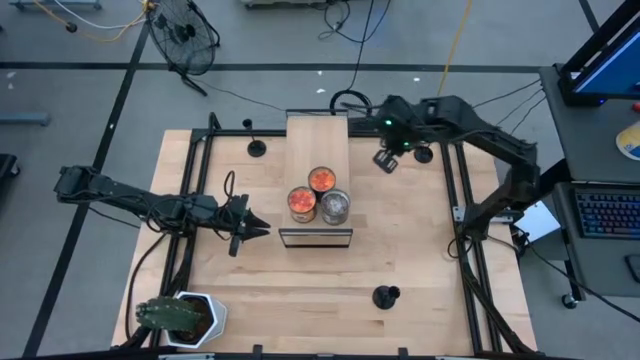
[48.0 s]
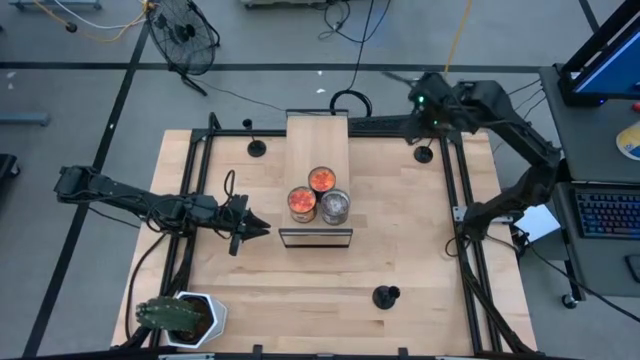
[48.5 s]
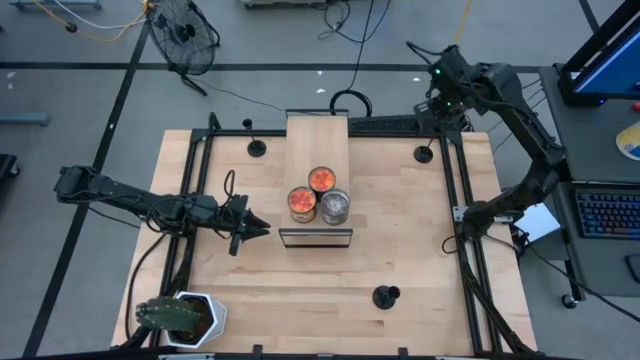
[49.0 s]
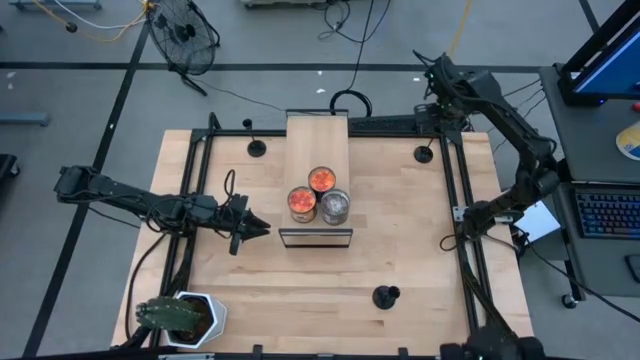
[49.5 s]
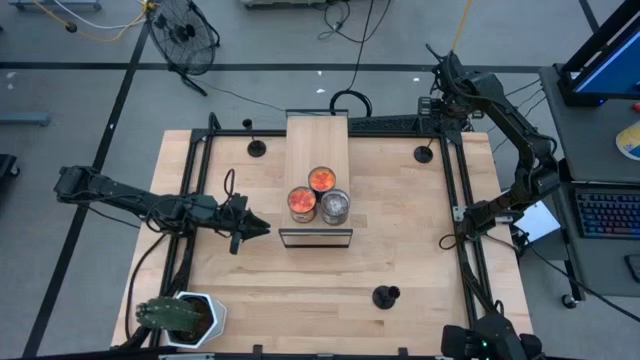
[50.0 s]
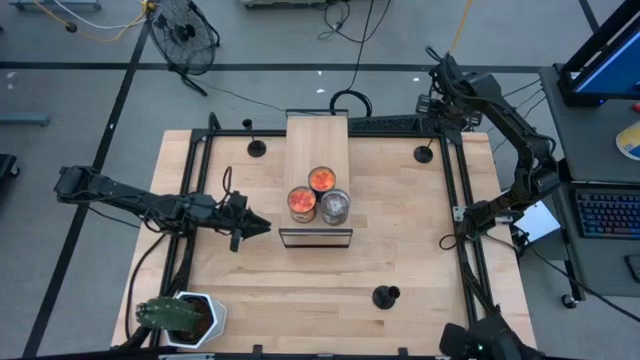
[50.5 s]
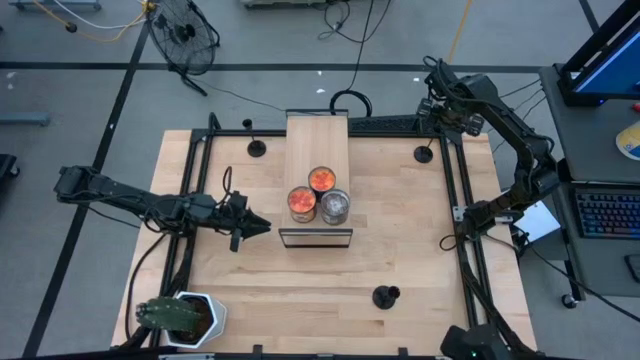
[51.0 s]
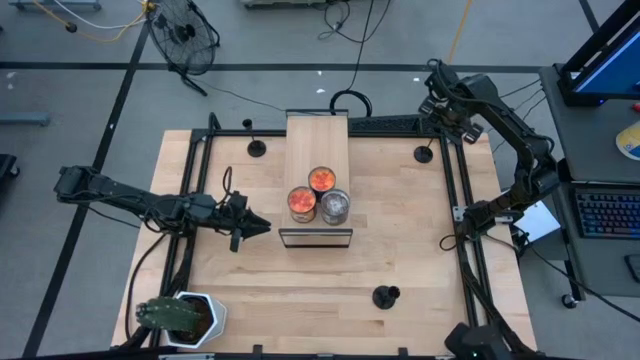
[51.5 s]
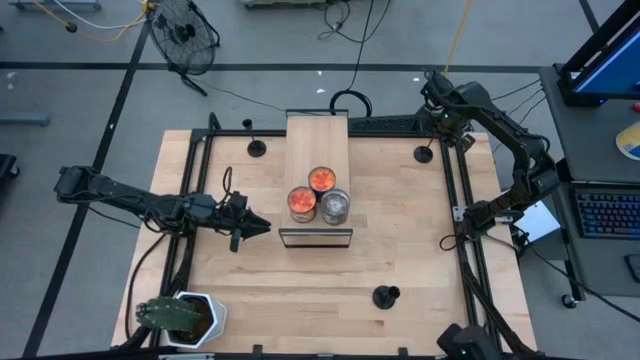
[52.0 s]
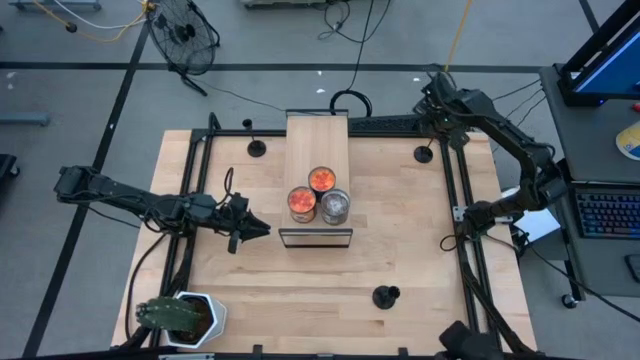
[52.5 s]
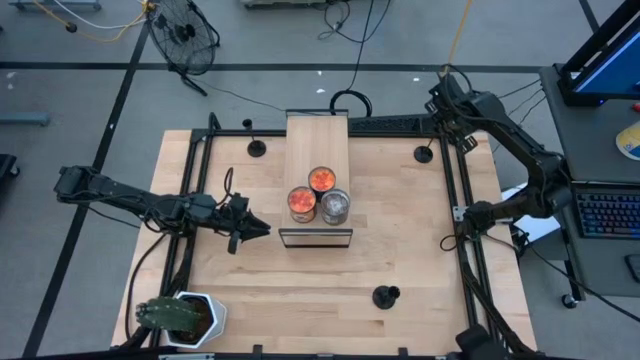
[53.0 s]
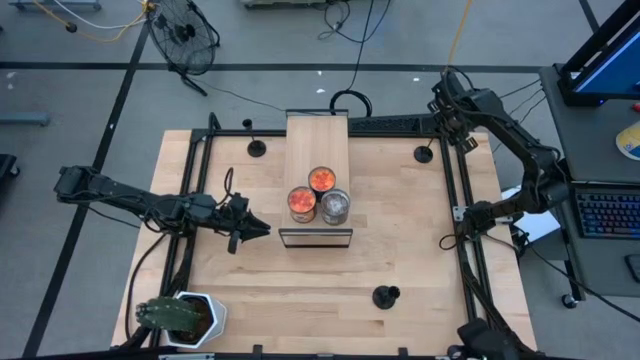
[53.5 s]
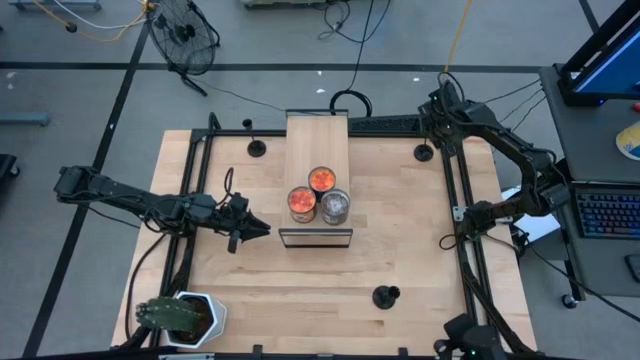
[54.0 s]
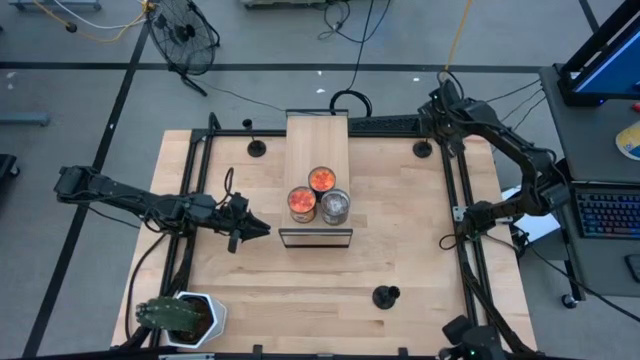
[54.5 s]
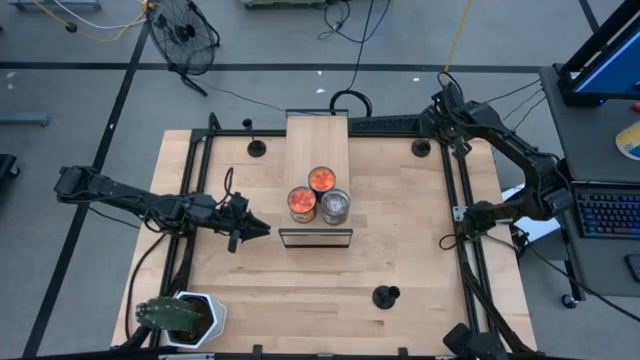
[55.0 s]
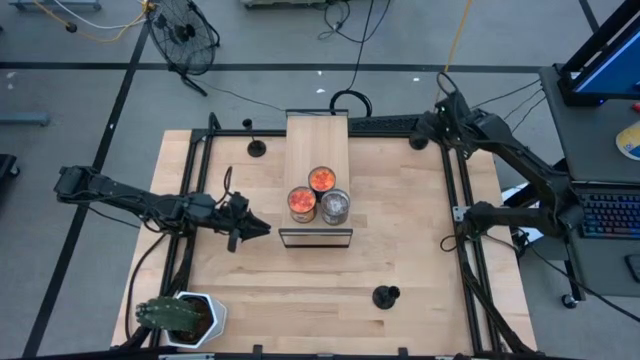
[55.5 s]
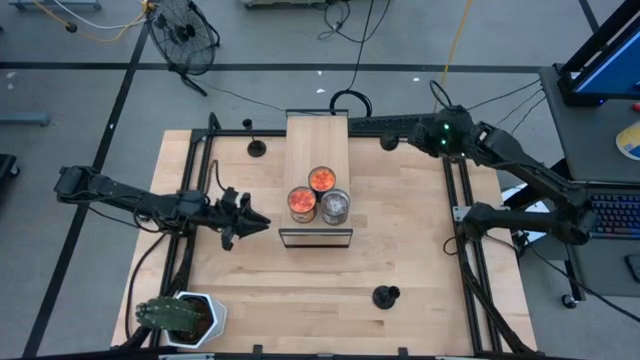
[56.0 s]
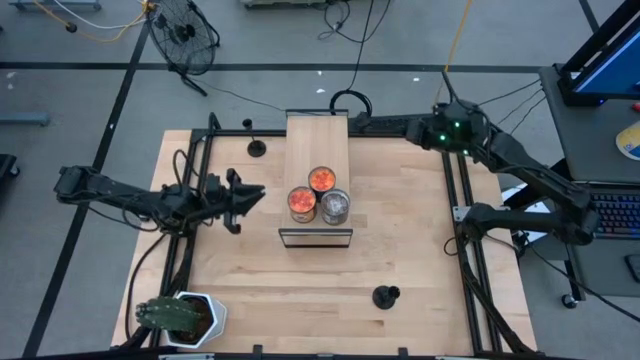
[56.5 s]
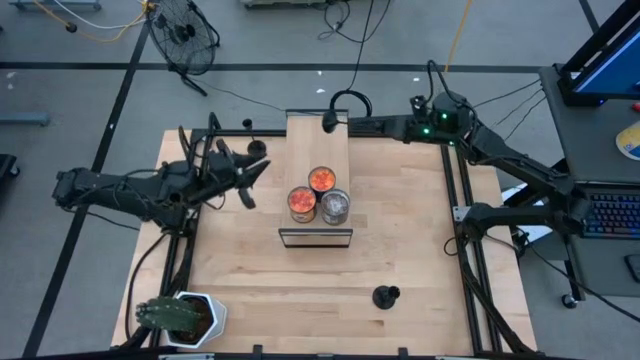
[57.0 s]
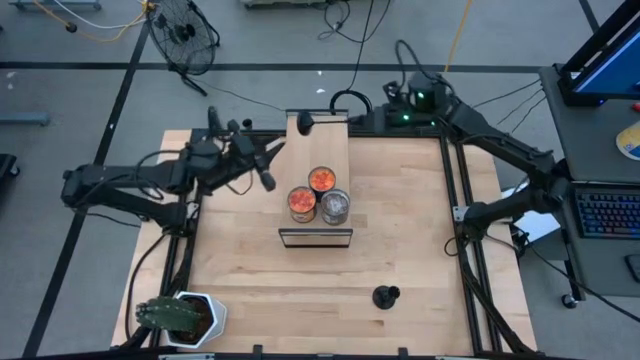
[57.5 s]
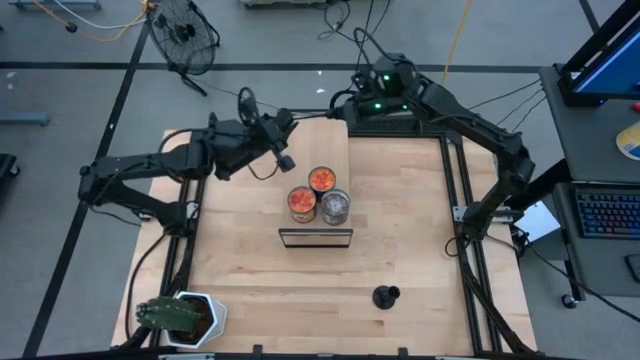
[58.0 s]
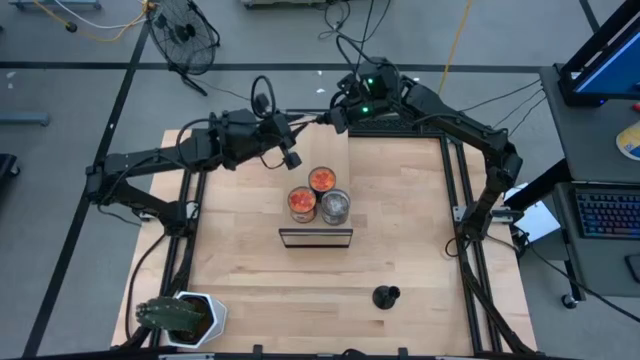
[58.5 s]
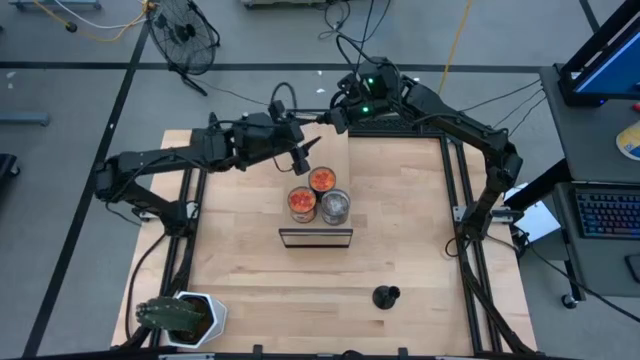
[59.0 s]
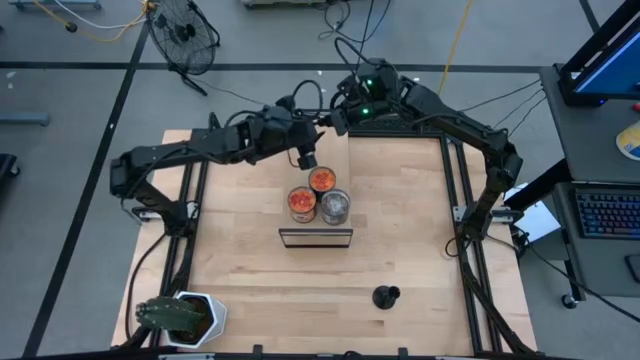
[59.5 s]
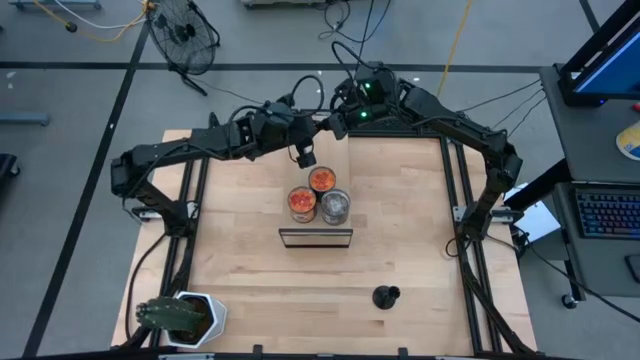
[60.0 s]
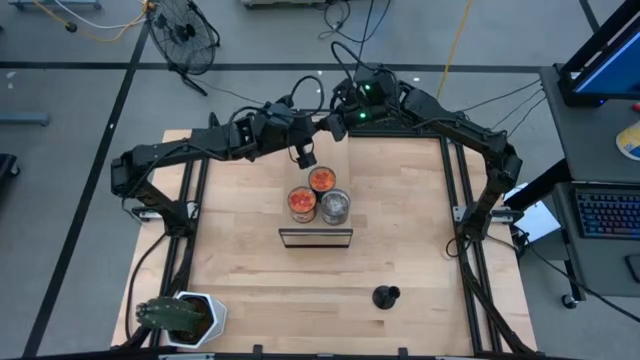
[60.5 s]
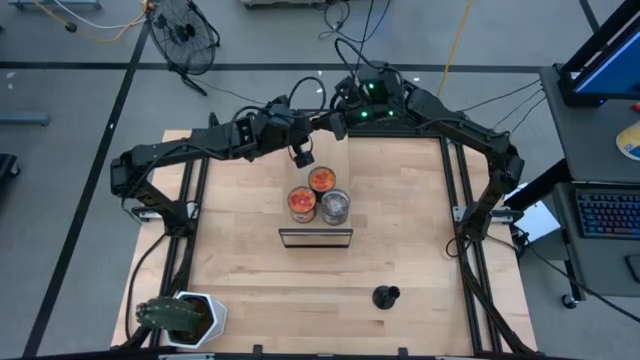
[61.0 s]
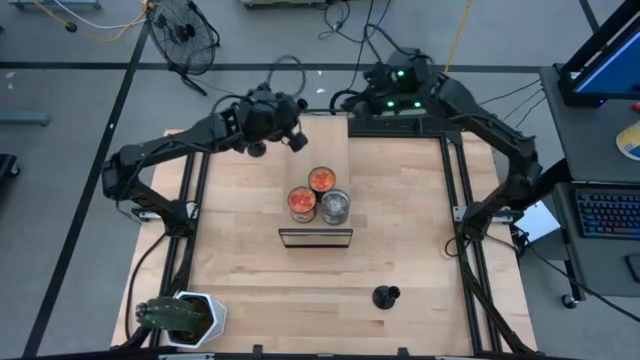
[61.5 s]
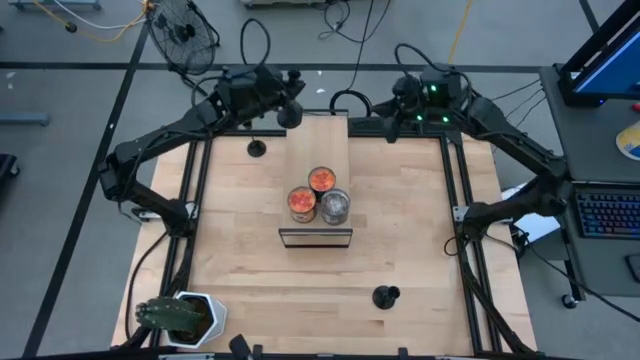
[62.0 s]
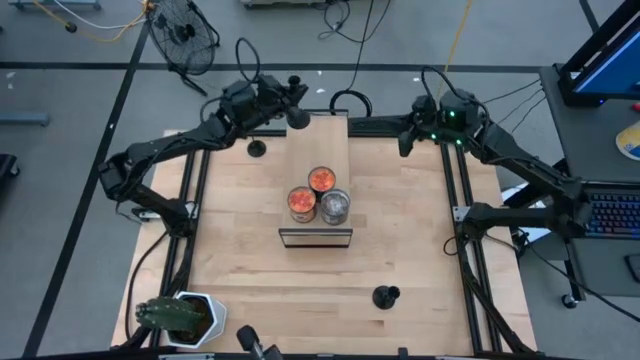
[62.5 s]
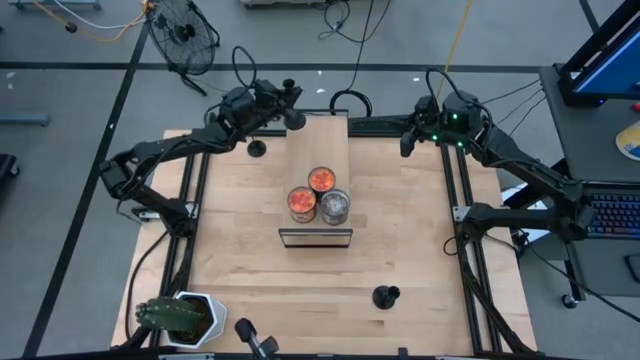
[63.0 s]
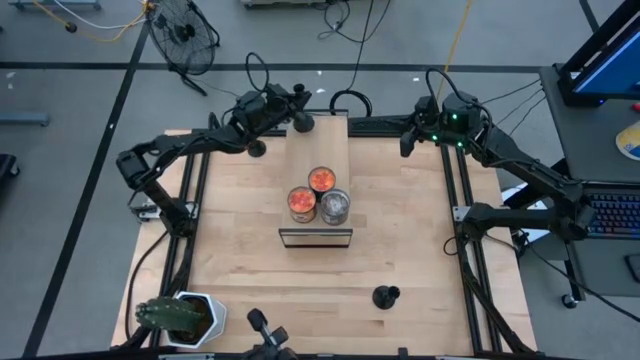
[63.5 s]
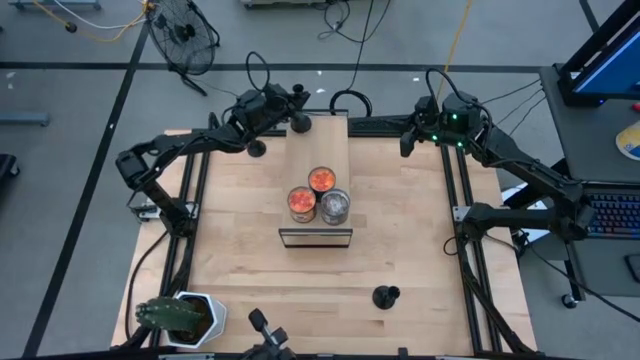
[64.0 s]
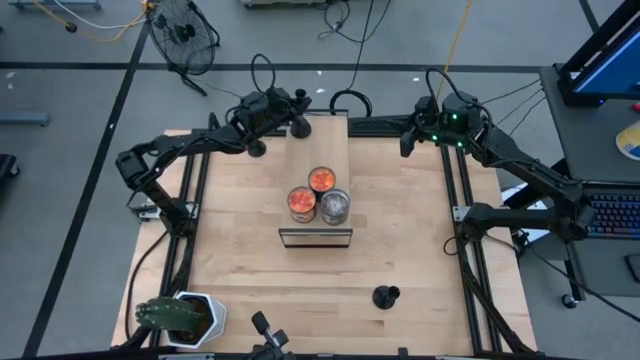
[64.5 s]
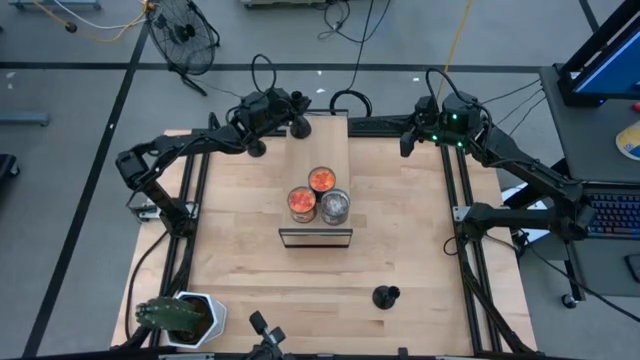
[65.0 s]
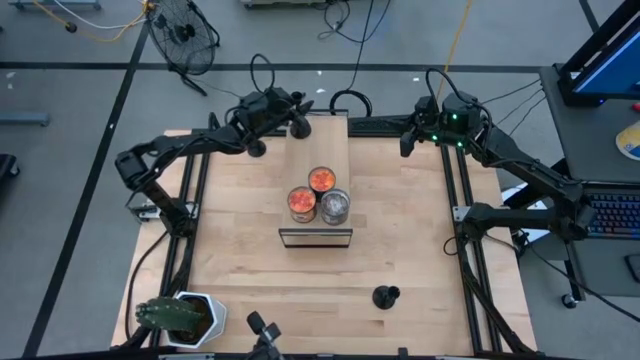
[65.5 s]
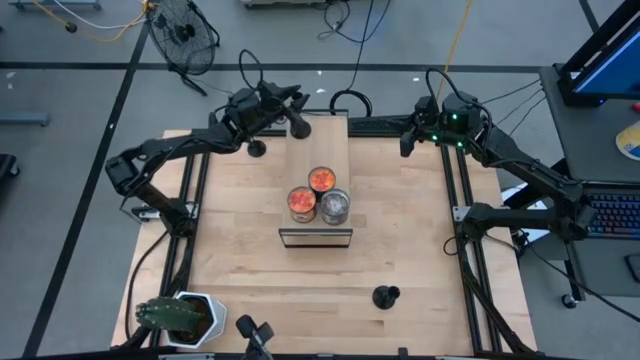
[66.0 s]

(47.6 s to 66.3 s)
Task: Pick & Place candle stick holders
Put the top right black candle holder on the shelf

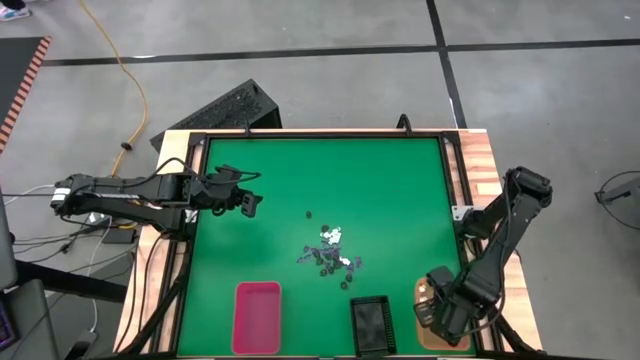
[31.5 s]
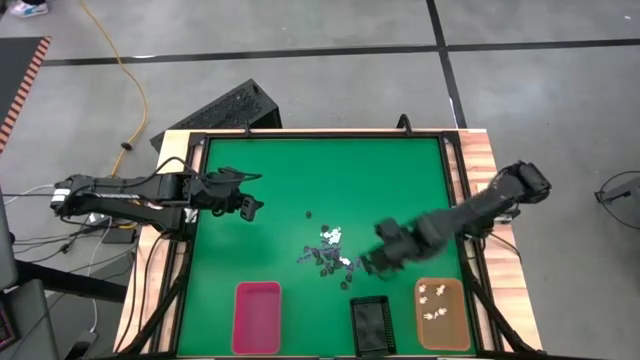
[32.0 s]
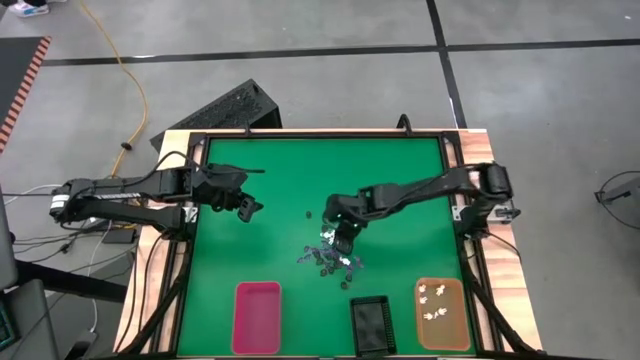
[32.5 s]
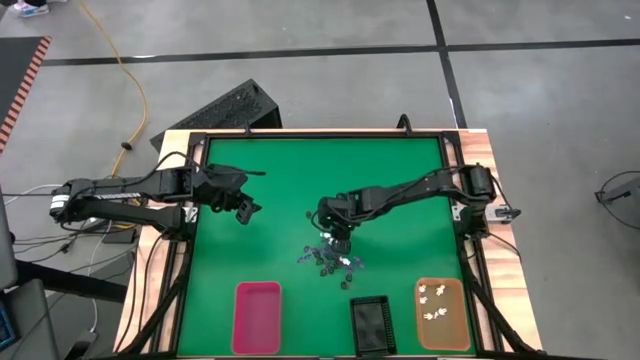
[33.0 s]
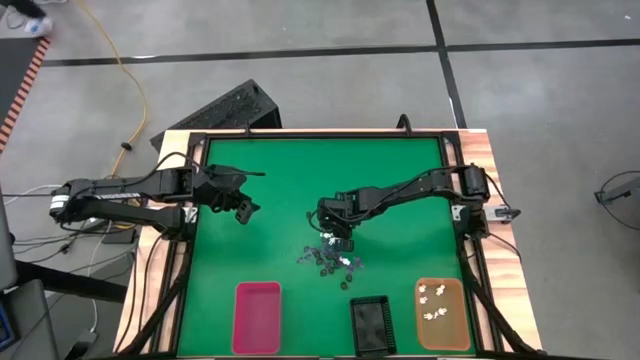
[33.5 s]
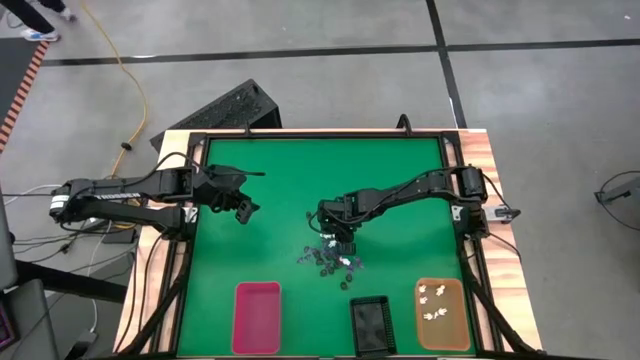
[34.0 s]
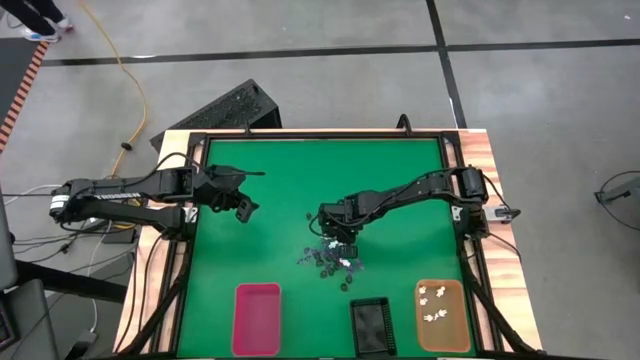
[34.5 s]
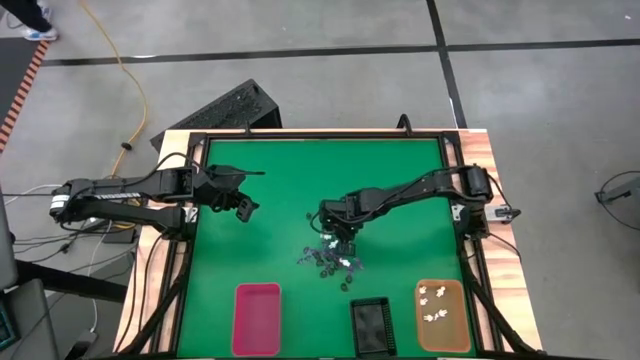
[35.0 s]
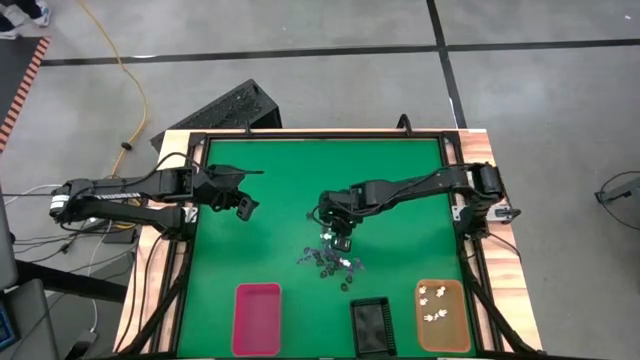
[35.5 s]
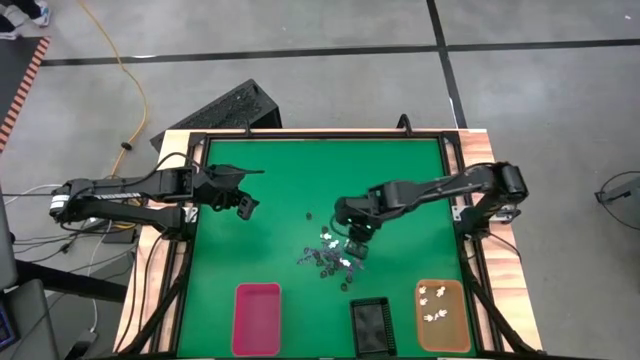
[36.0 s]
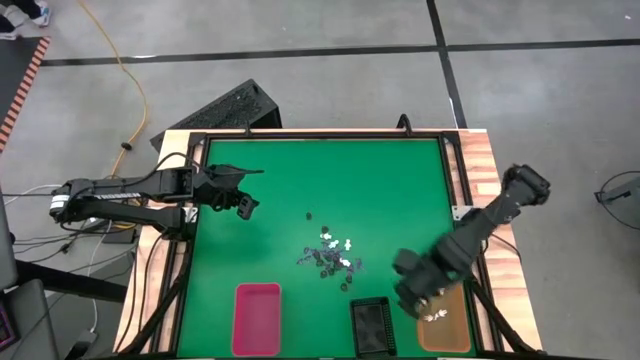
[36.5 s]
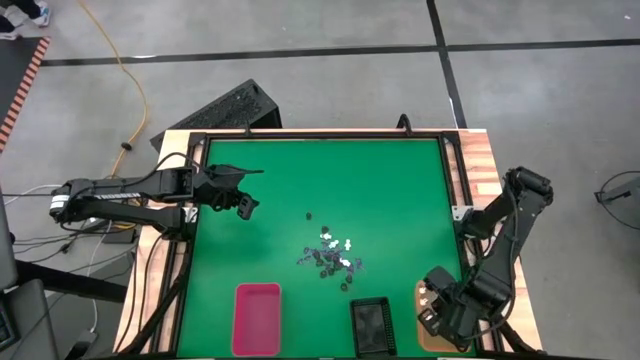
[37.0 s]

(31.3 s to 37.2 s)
Task: Sort Halloween decoration
Put the white skeleton toy into the right orange organizing bin
